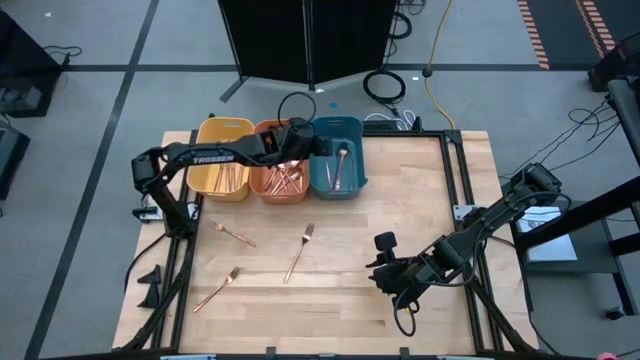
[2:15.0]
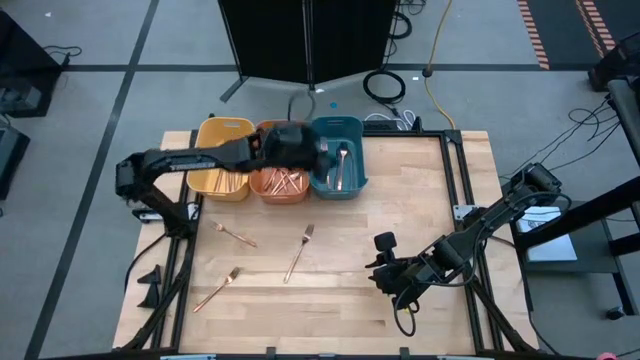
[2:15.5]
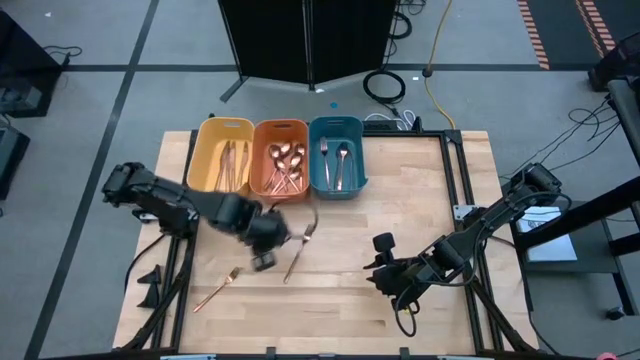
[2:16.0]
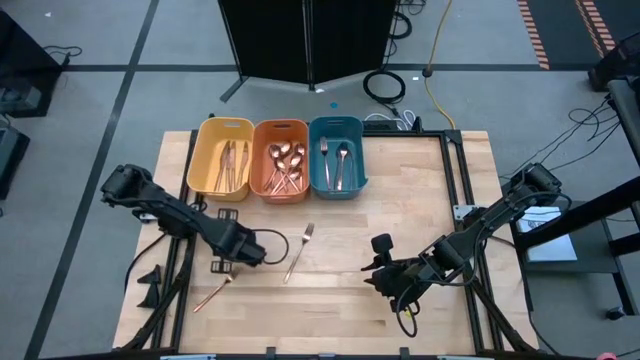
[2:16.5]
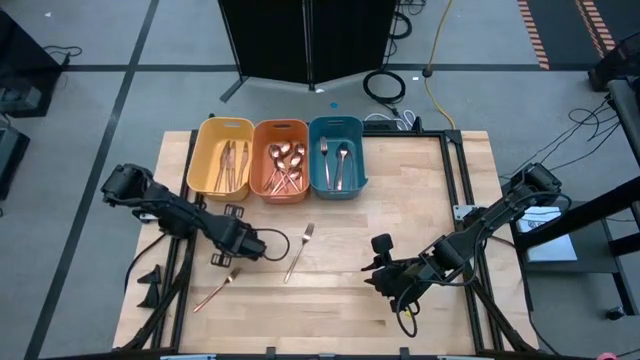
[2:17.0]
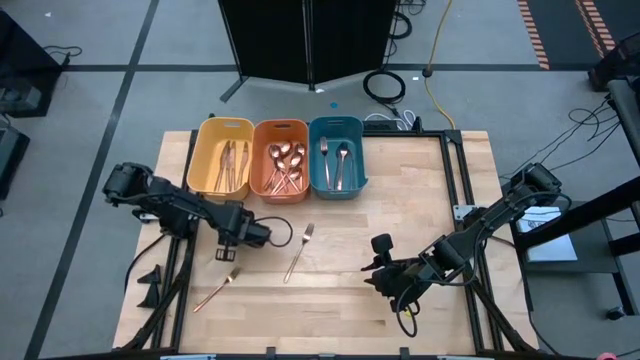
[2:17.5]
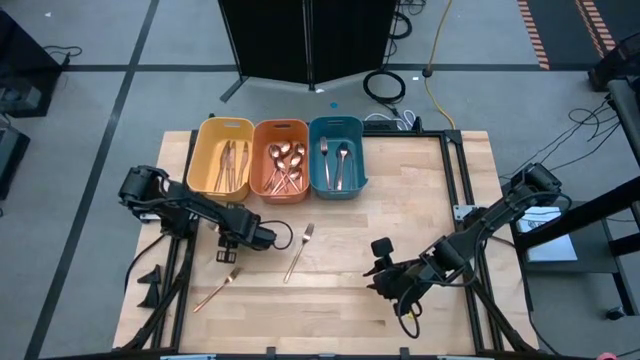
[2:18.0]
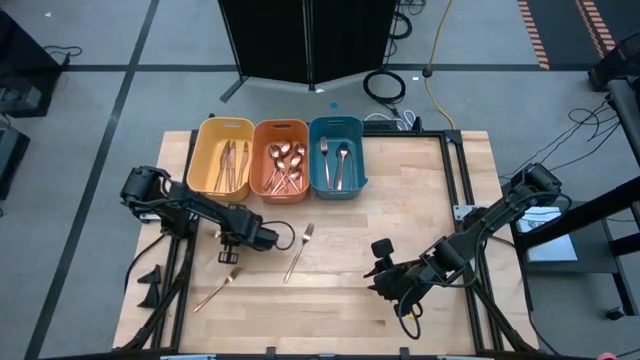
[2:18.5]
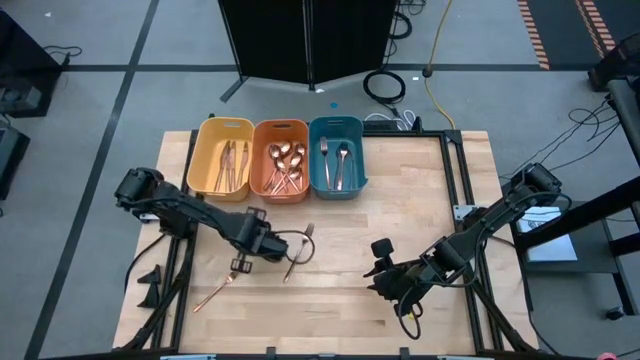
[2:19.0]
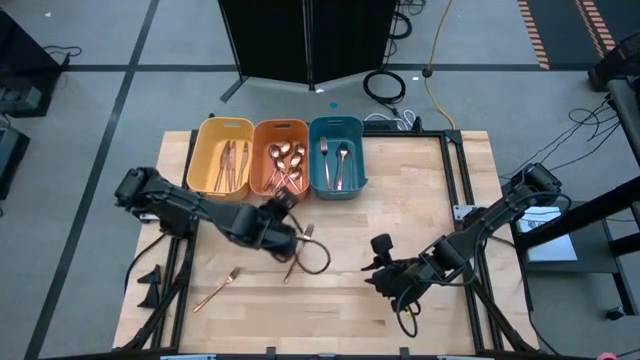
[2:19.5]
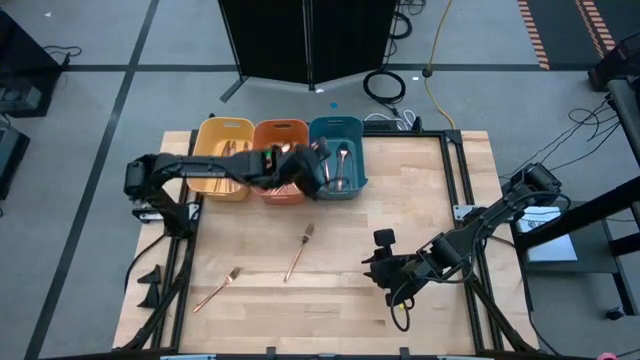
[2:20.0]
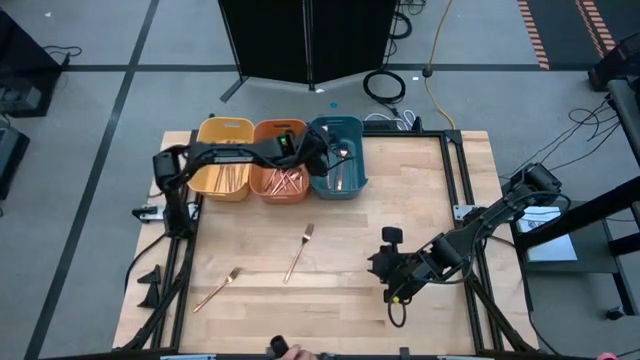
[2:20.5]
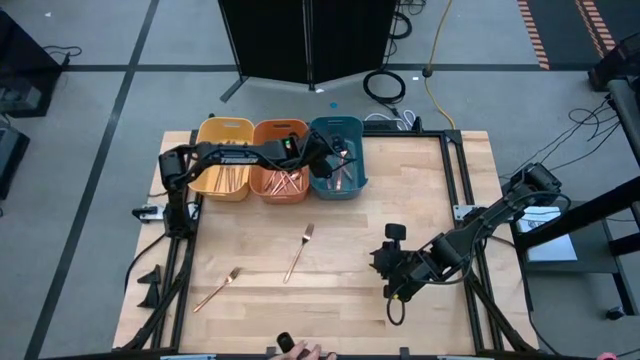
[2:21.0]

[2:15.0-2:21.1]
Task: Sort silverware
Put the gold fork into the blue bin

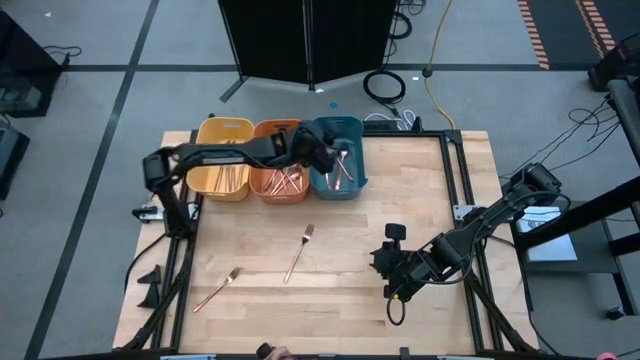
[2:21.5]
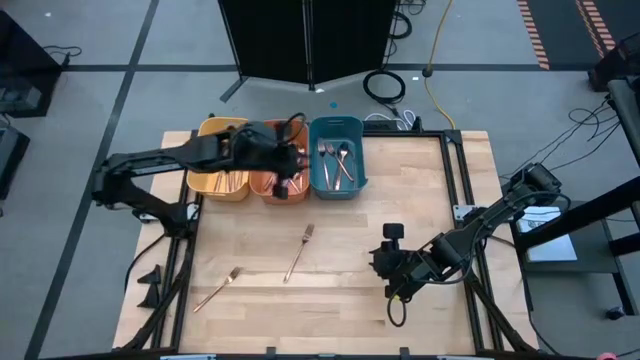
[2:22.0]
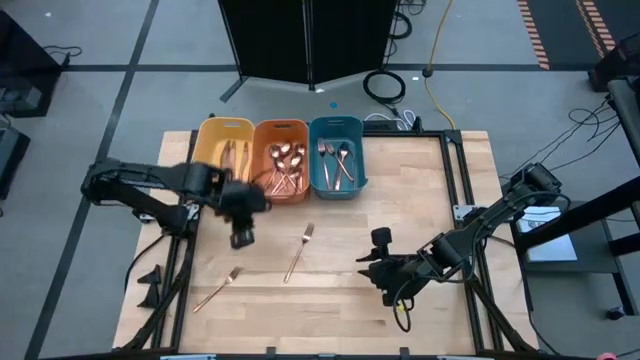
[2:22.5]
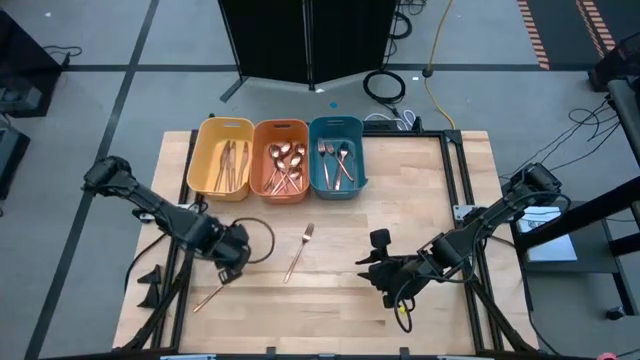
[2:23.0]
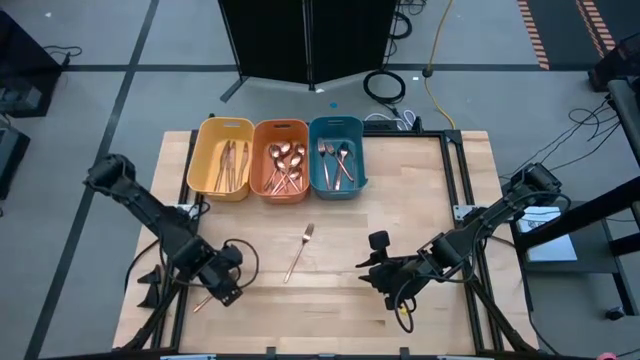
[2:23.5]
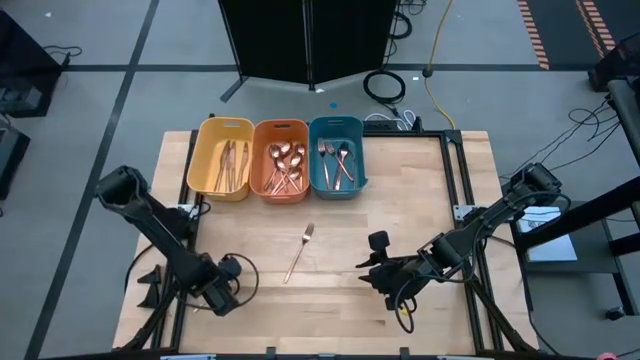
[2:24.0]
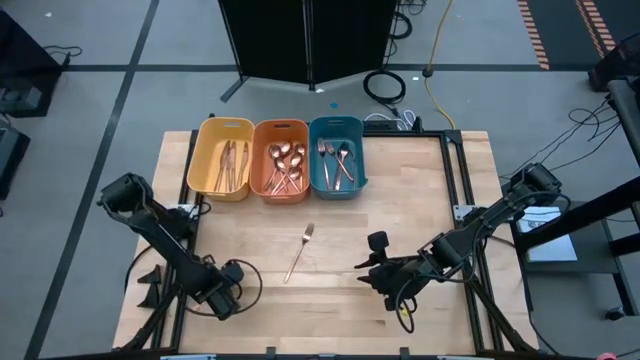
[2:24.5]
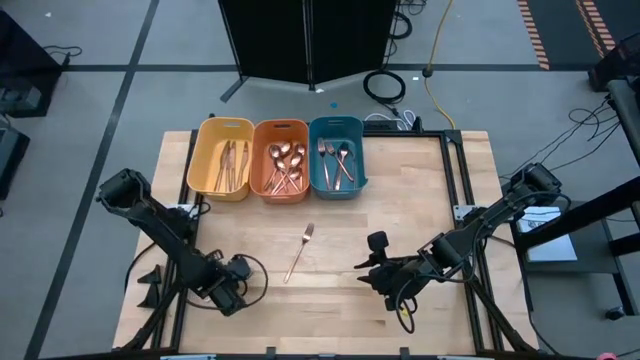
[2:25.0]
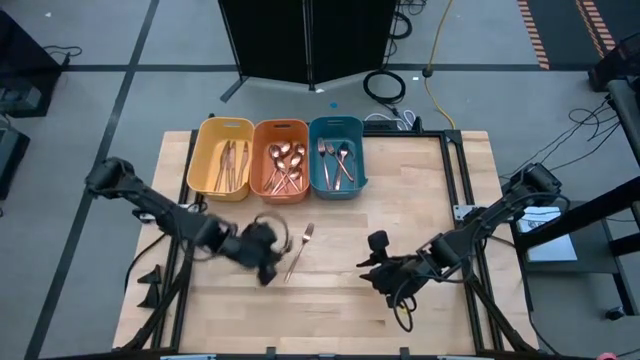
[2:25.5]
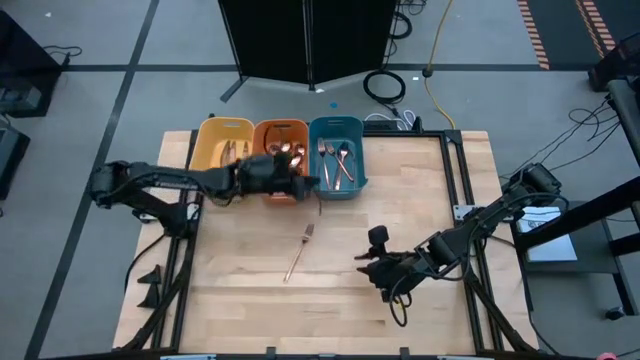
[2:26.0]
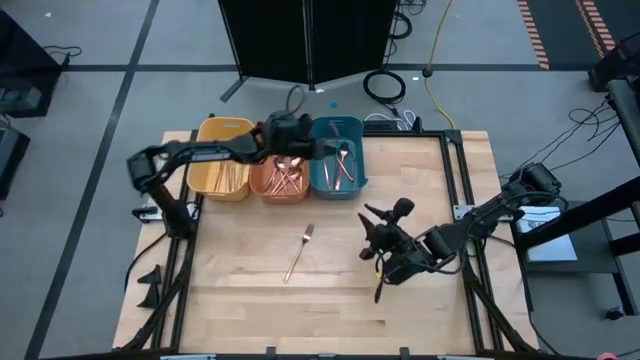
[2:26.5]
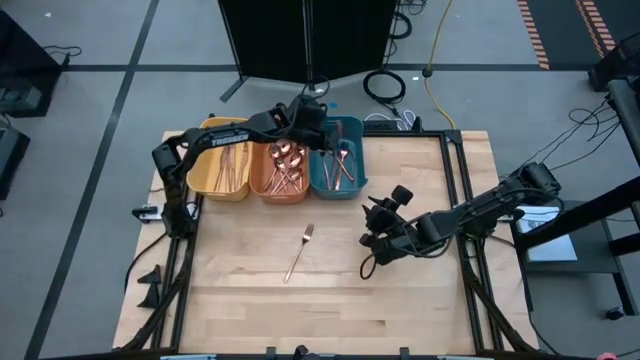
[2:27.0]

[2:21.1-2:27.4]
Put the gold fork into the blue bin

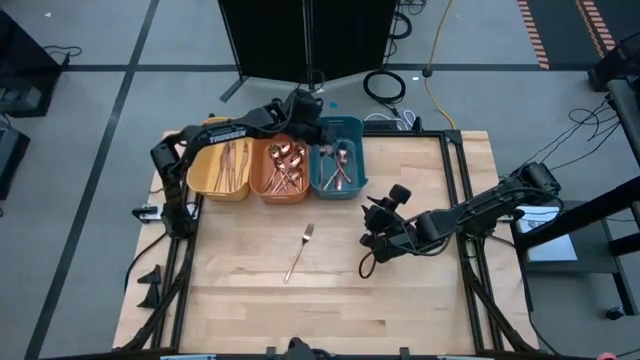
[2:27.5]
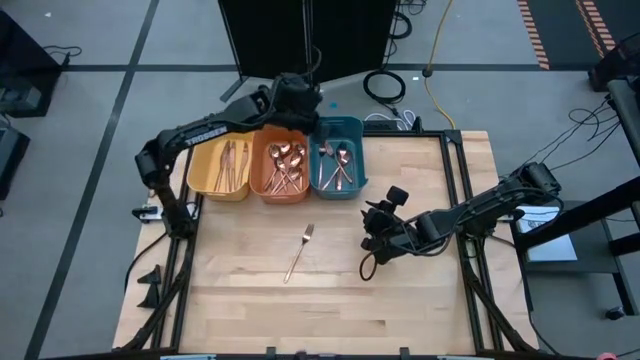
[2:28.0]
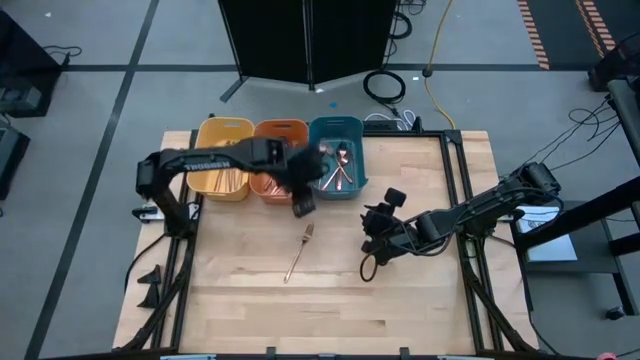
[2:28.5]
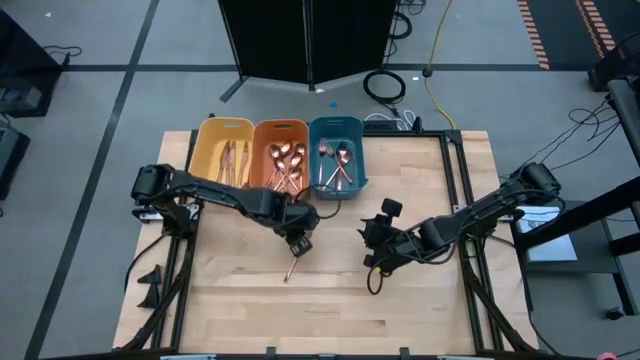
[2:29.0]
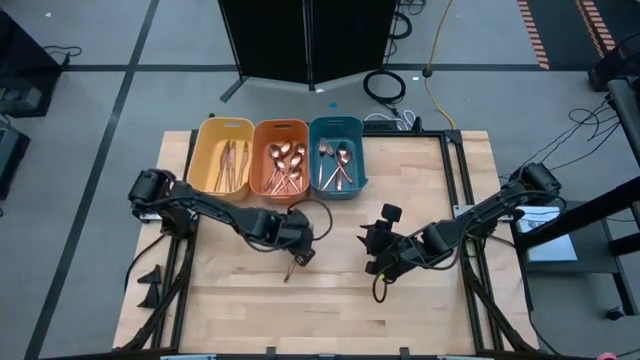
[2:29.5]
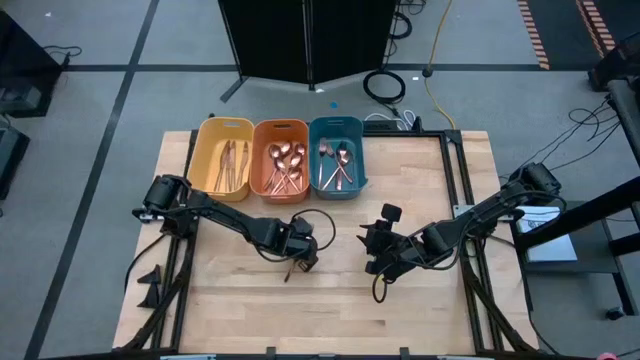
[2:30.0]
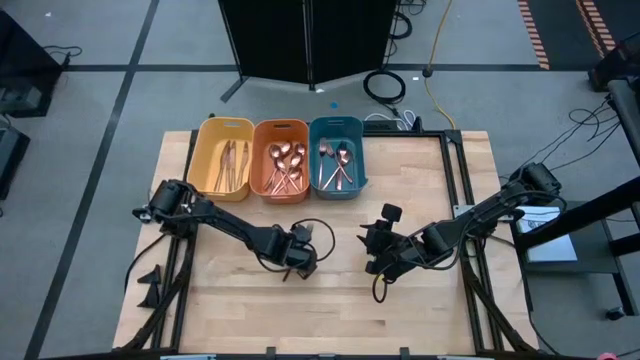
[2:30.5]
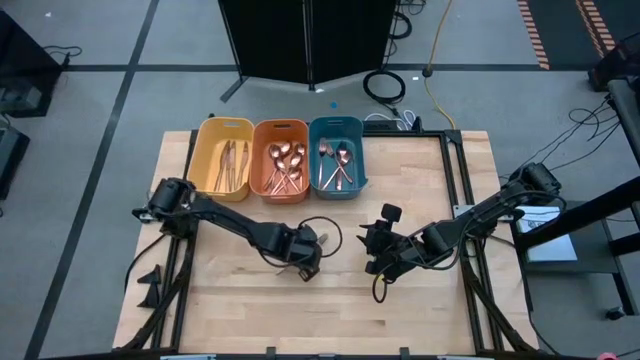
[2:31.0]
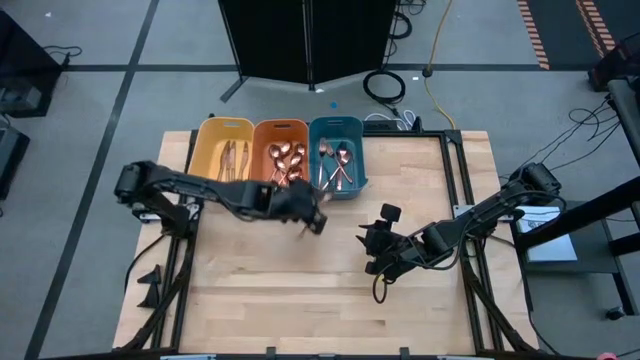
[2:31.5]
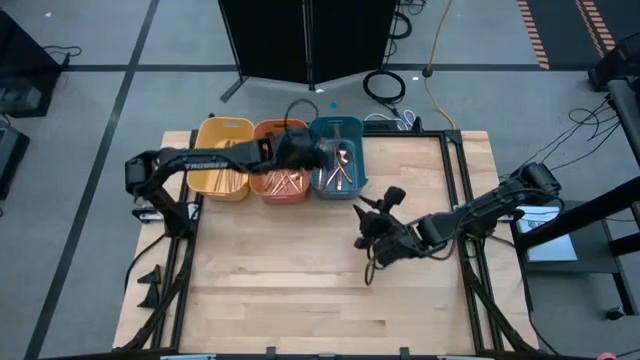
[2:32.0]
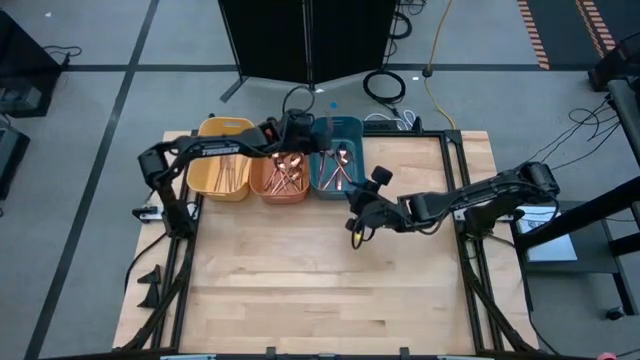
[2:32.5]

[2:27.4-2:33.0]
Put the gold fork into the blue bin
